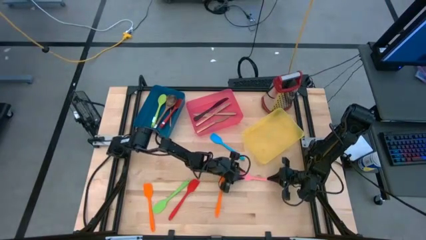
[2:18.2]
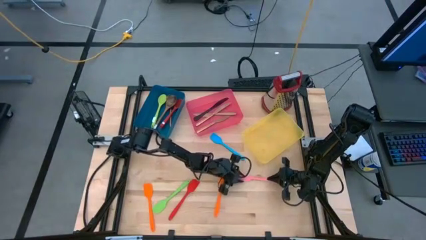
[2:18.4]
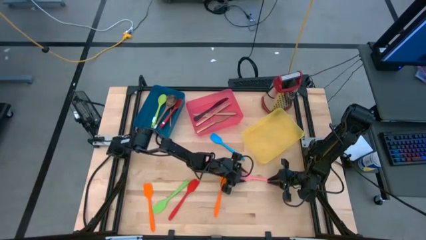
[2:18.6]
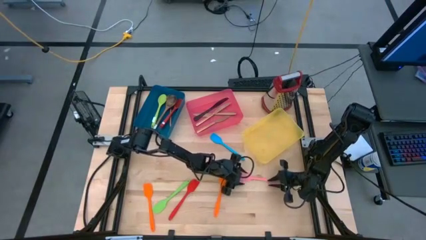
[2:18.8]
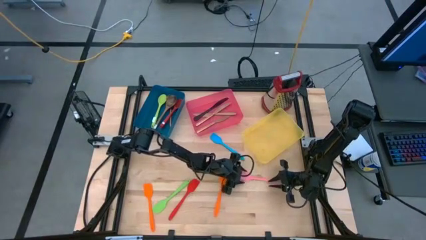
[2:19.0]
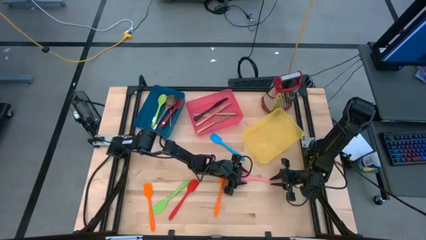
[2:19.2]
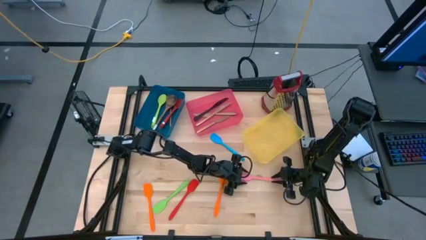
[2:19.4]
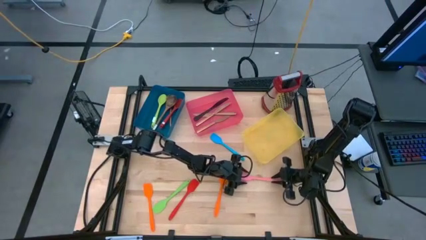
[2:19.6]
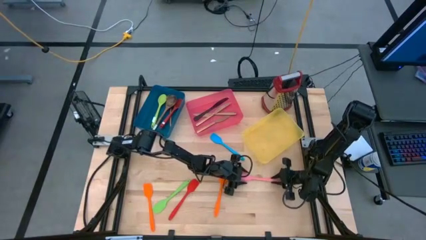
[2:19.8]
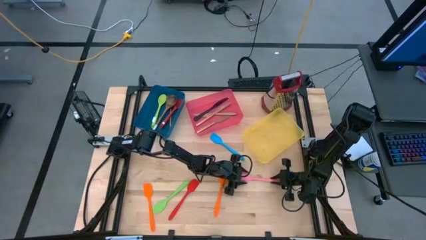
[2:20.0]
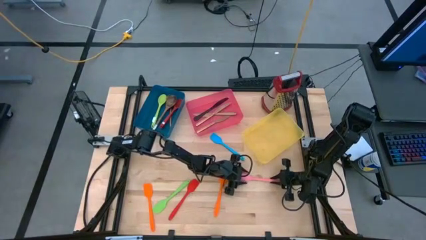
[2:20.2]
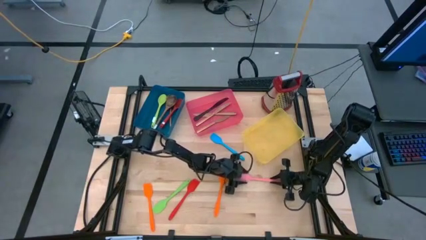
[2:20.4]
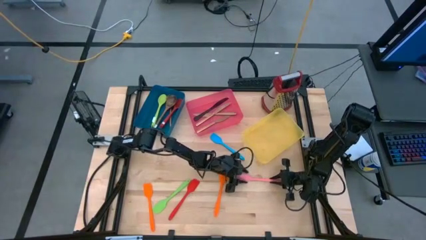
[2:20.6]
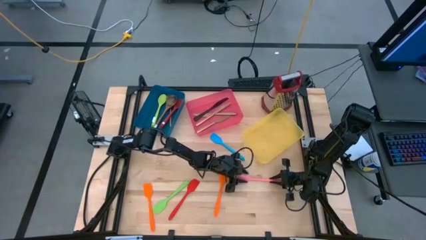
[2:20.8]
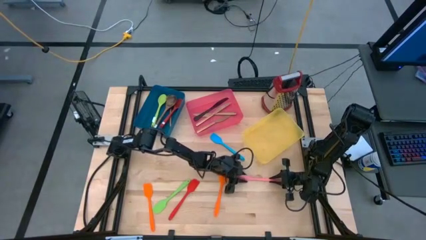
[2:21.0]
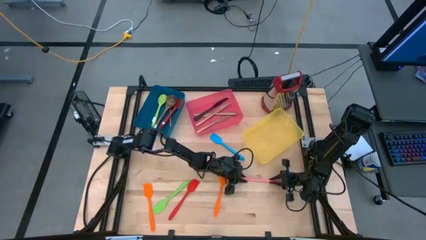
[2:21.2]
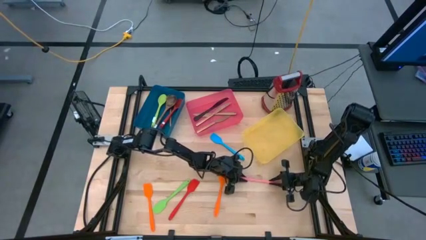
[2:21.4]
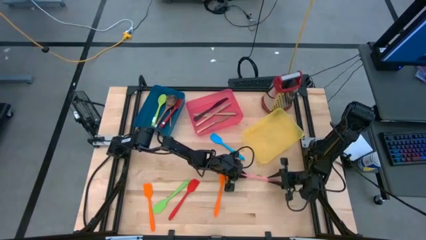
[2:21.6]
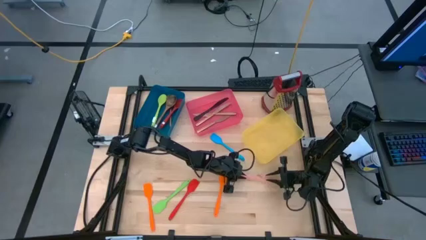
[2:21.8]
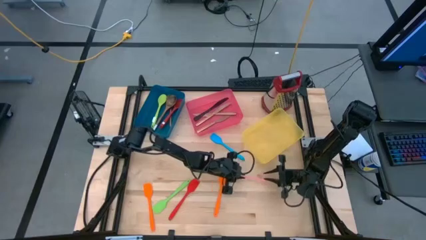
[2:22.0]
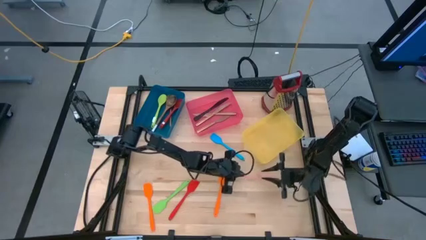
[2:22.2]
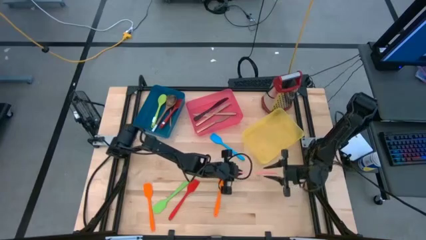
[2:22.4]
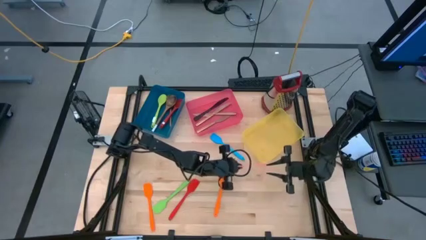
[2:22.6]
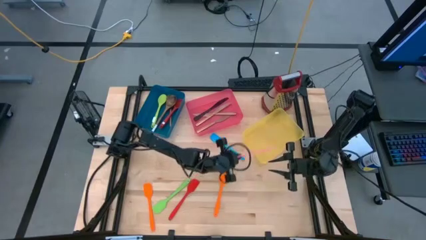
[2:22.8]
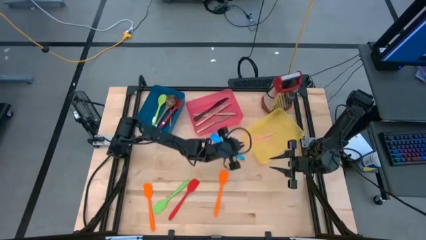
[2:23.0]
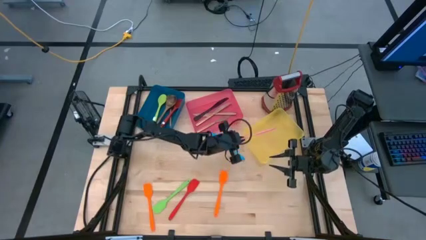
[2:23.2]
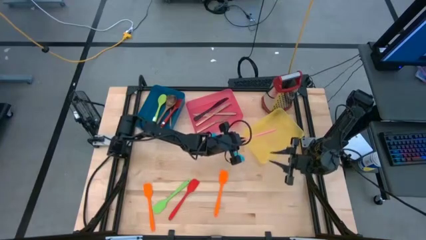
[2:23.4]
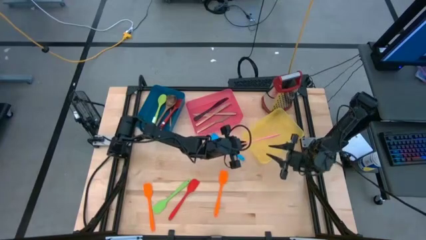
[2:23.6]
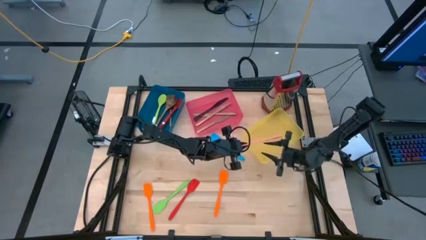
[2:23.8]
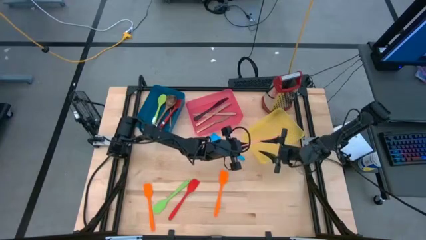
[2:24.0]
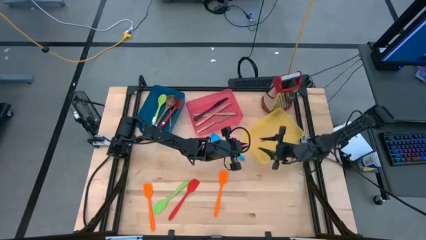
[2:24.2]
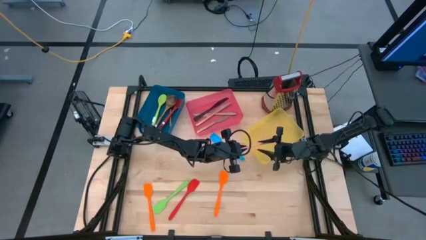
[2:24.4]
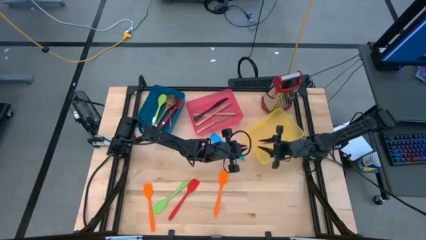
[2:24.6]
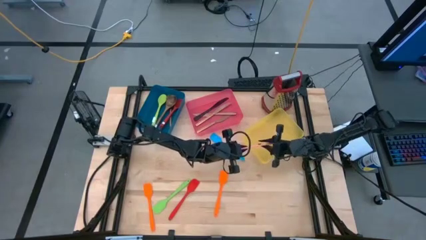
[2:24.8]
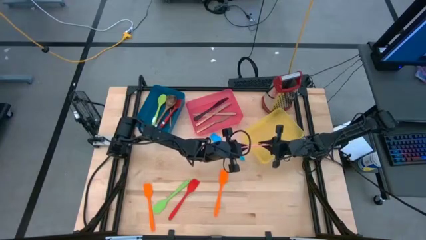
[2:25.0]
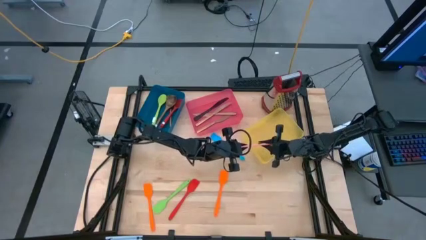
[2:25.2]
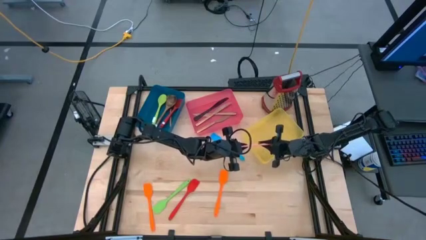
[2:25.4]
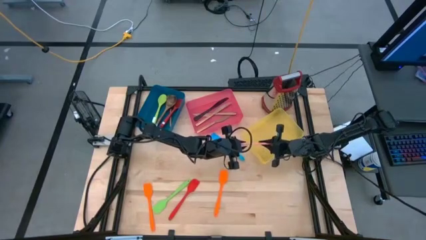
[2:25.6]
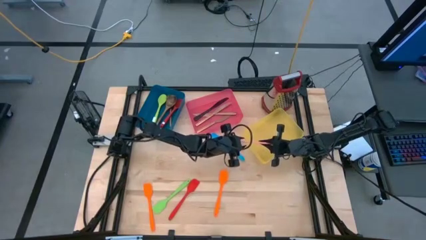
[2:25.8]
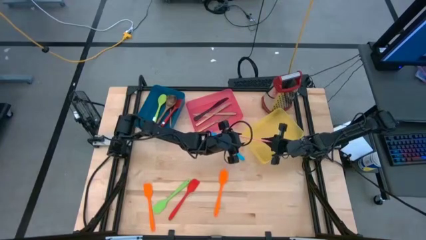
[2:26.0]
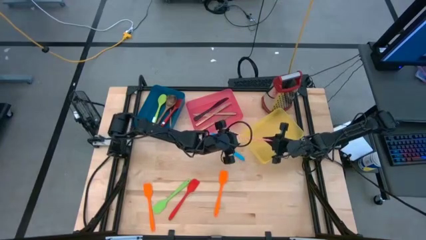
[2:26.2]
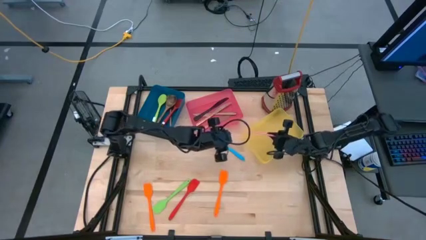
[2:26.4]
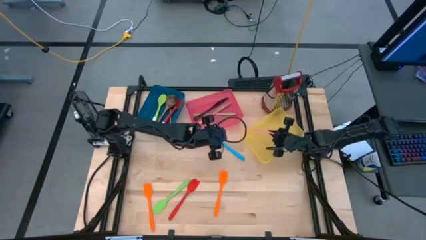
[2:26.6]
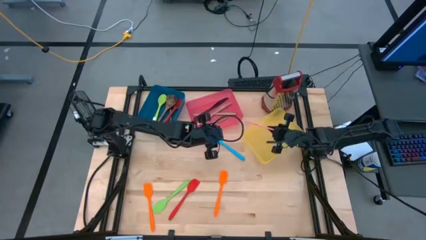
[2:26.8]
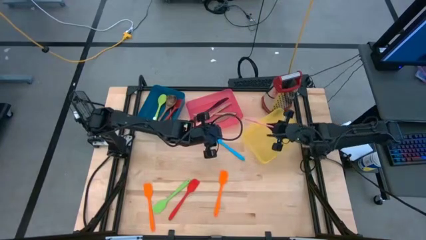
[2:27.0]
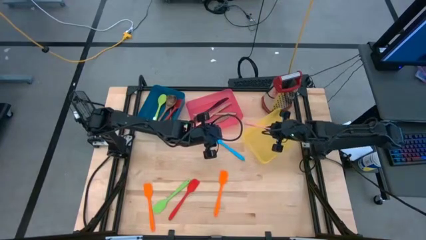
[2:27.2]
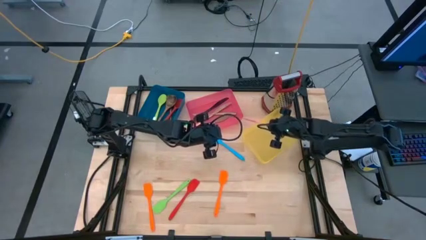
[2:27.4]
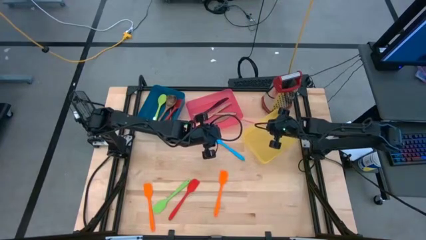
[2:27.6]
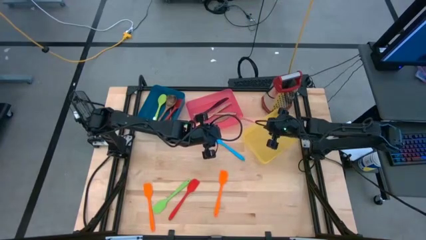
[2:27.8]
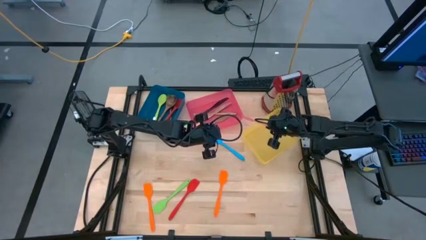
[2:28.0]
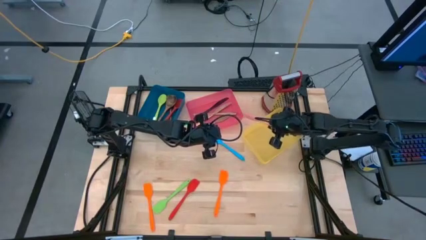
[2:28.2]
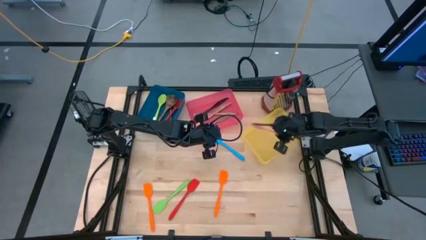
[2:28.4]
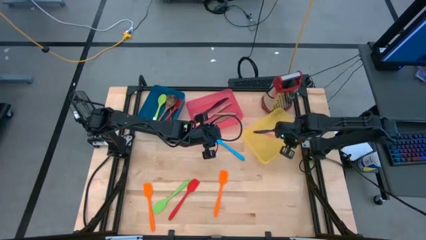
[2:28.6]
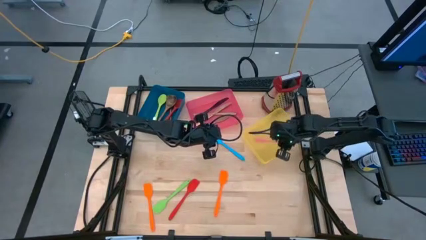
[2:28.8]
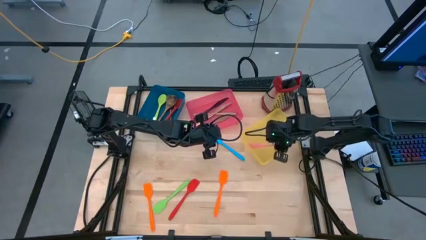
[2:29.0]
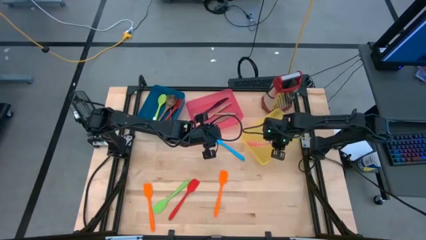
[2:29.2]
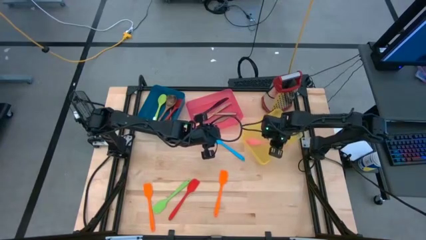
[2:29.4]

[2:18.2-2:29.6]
Task: Pick & Place Kitchen Items
Put the pink spatula into the yellow bin

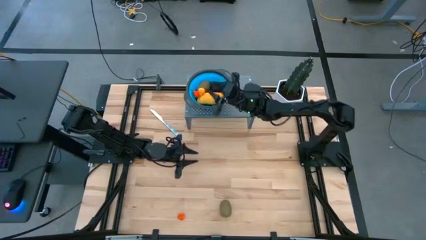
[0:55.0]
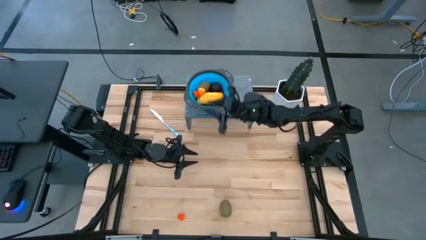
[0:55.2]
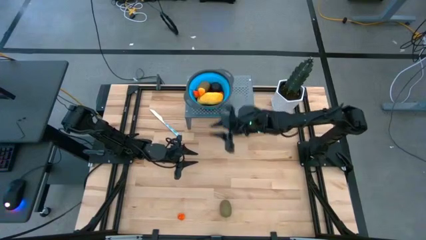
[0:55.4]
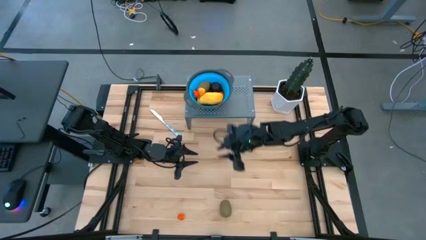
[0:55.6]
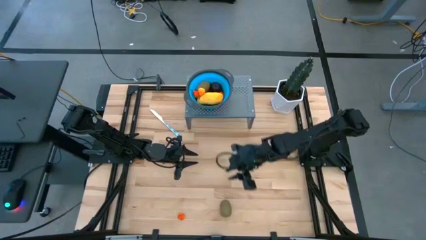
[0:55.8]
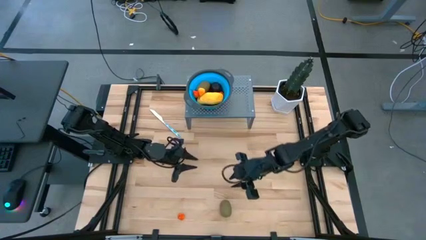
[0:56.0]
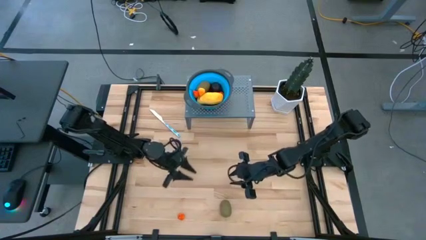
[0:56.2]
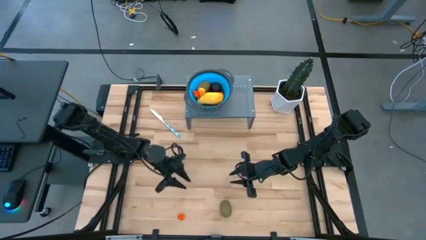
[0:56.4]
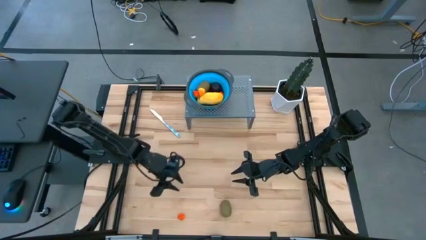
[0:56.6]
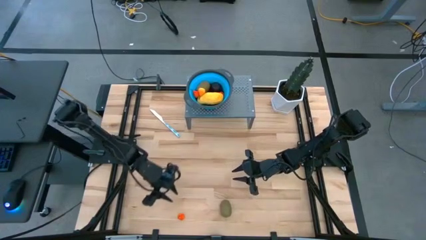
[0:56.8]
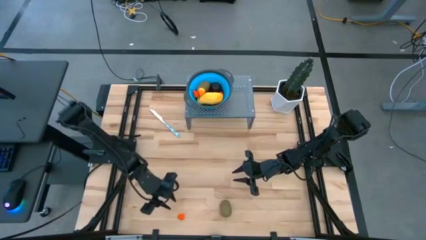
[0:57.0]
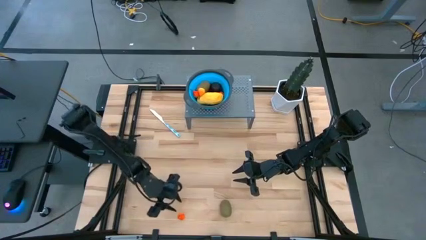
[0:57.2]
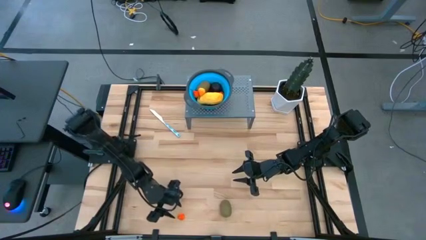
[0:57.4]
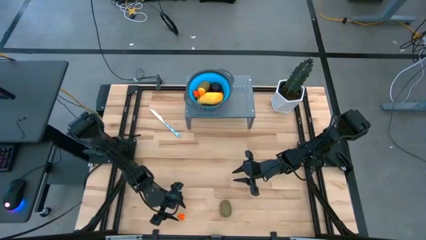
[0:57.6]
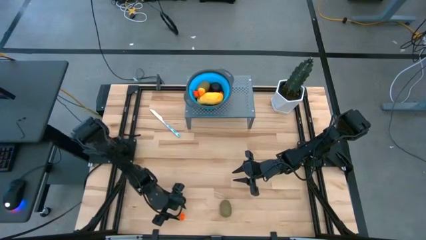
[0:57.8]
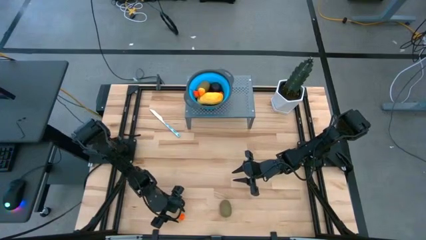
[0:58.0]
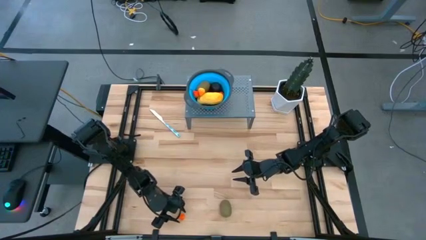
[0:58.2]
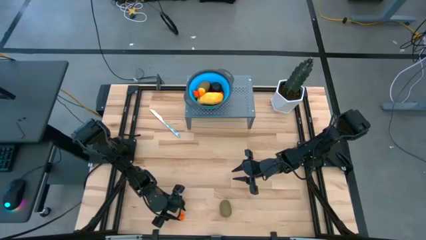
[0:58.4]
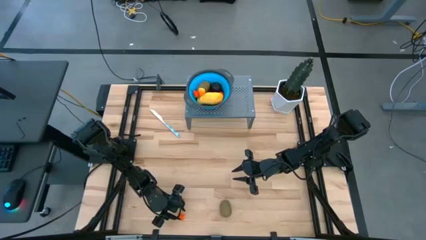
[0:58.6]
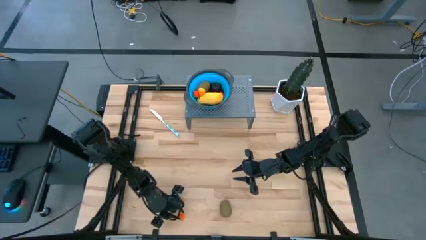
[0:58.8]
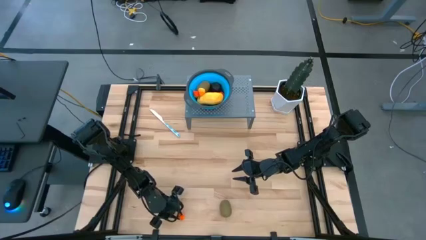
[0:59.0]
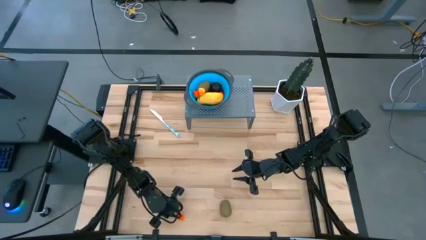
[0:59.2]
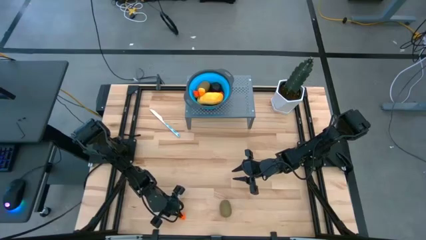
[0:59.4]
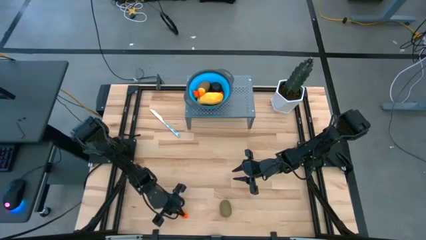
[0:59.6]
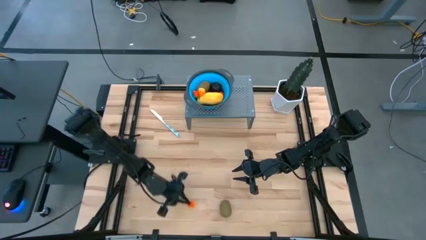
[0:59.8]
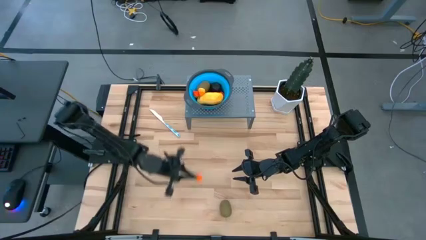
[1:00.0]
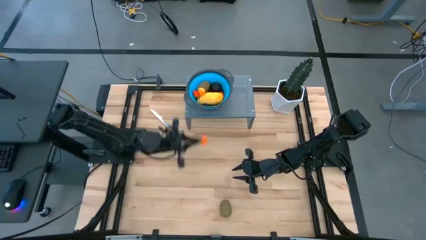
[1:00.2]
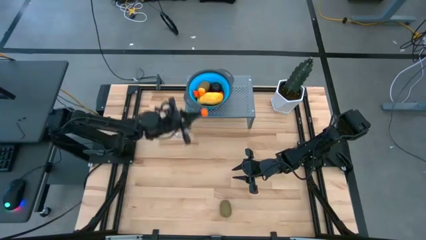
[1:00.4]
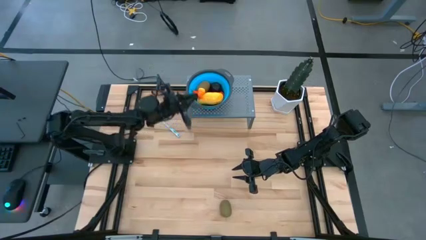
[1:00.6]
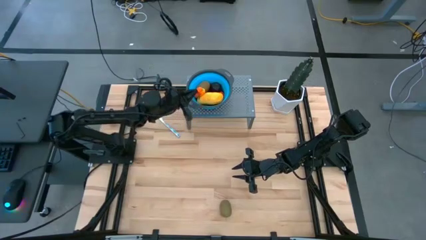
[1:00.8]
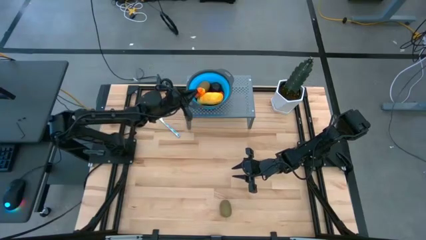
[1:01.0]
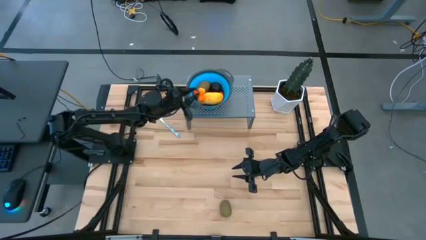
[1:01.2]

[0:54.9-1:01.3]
Task: Pick & Place Fruit
Put the orange pear into the blue strainer bowl
